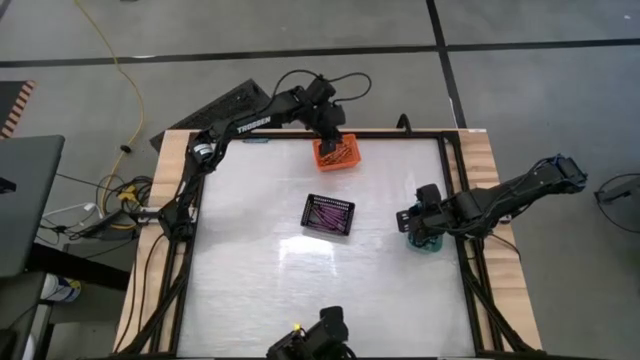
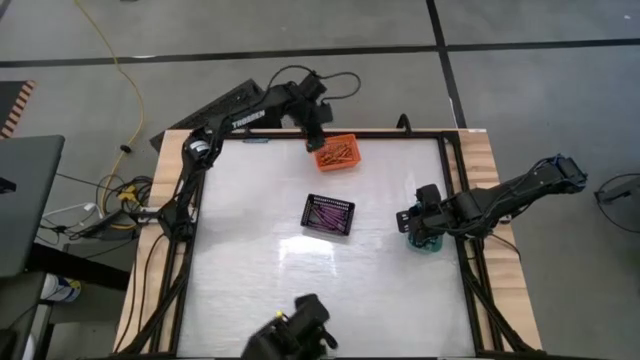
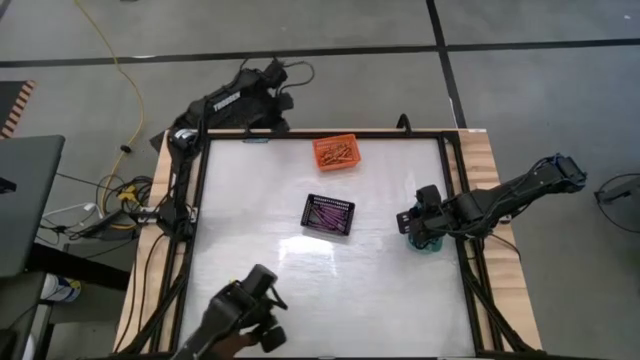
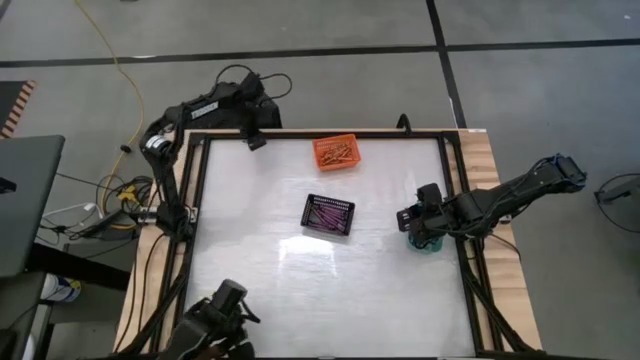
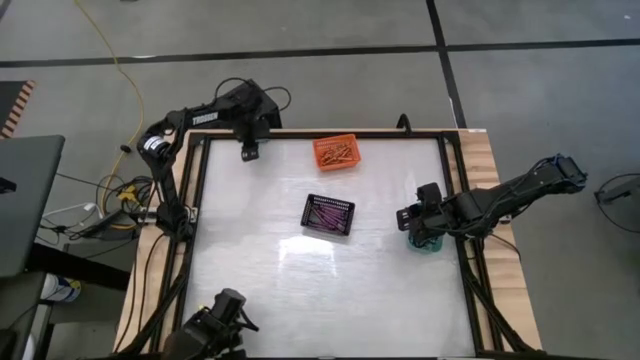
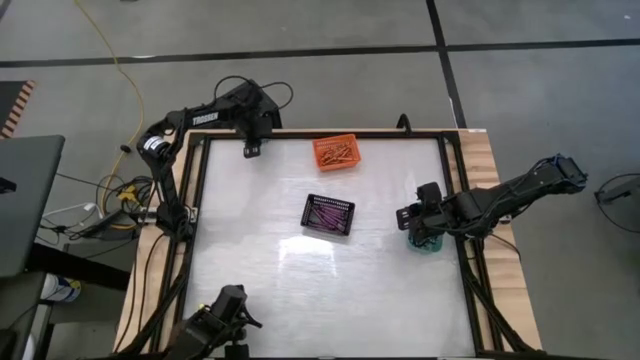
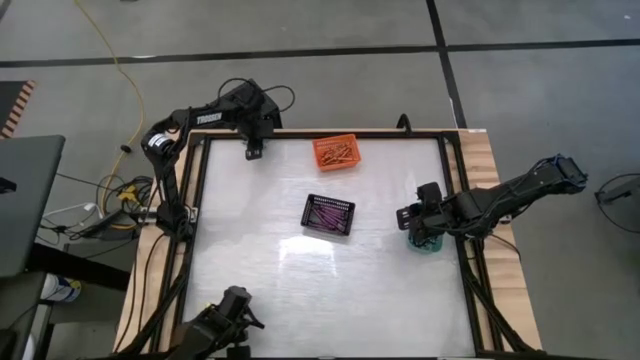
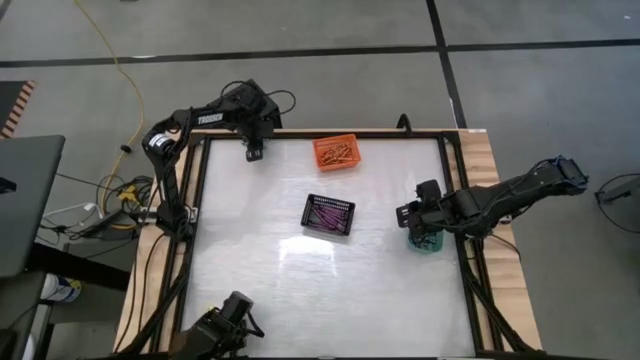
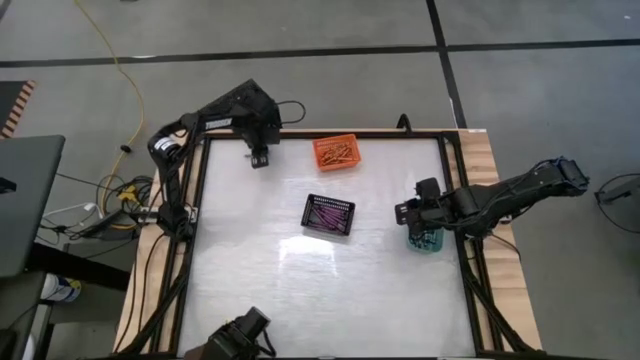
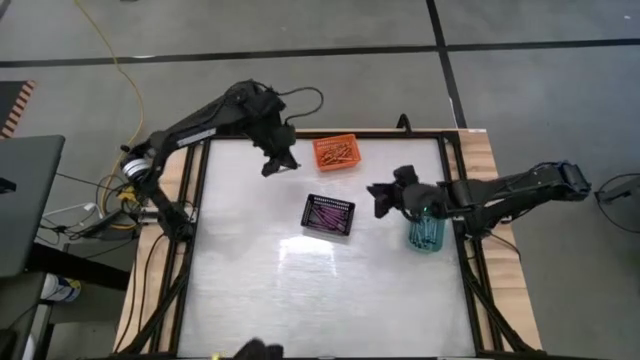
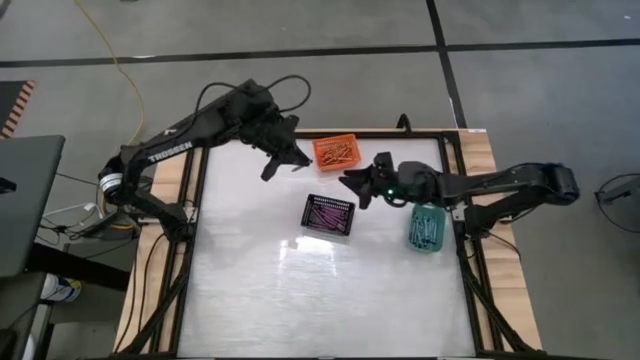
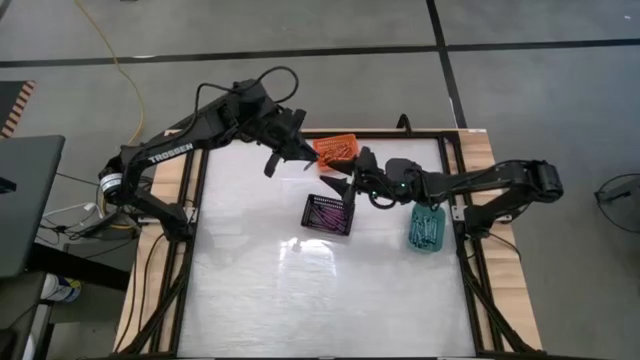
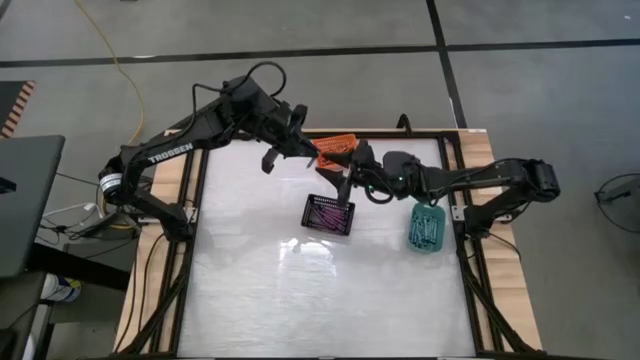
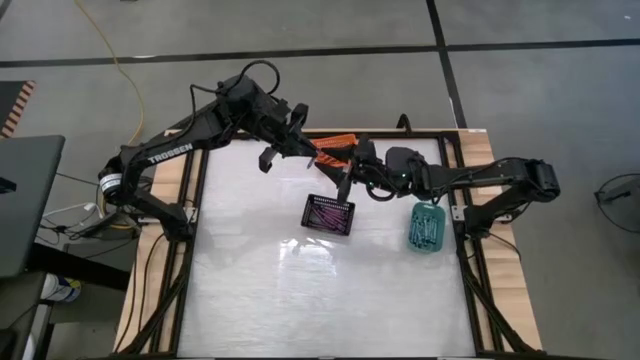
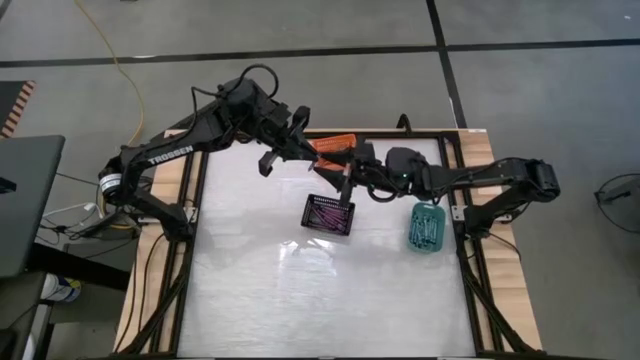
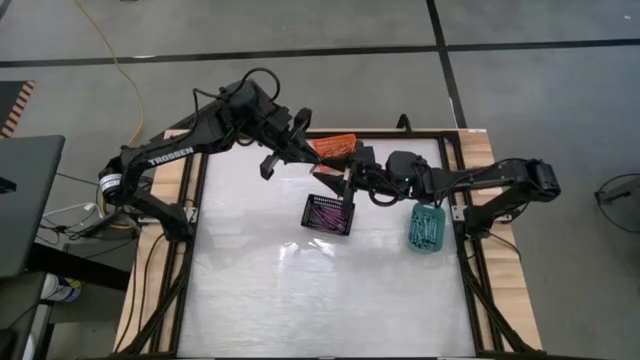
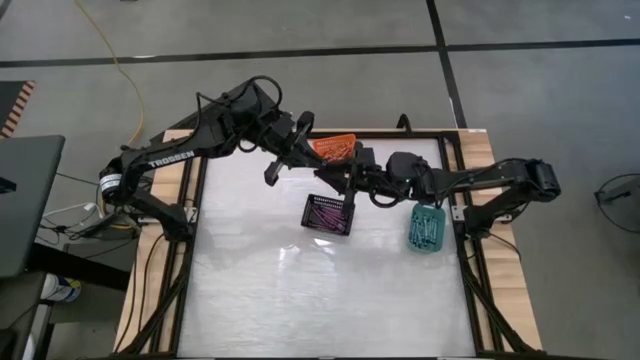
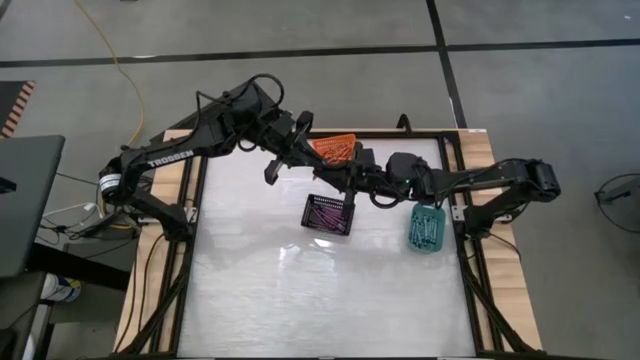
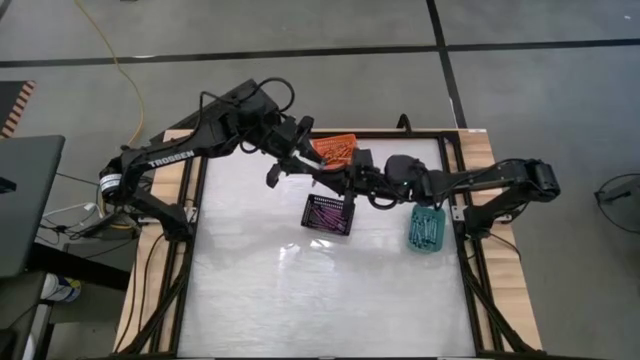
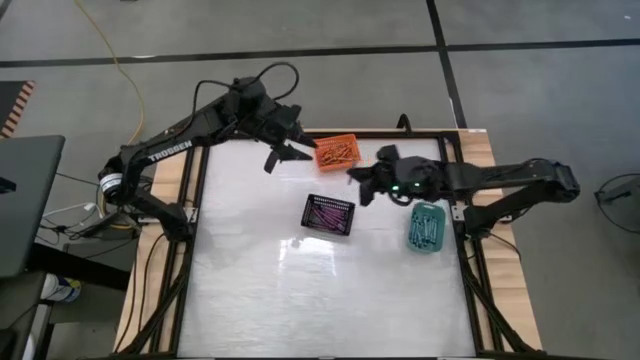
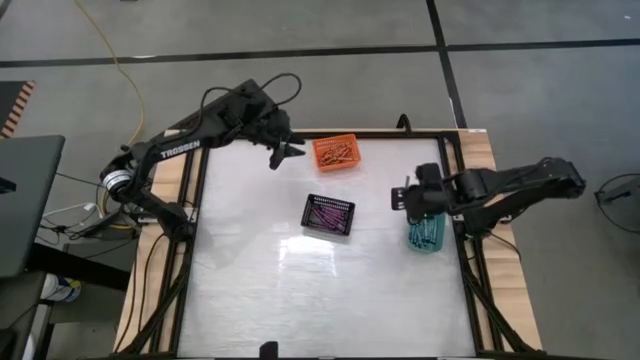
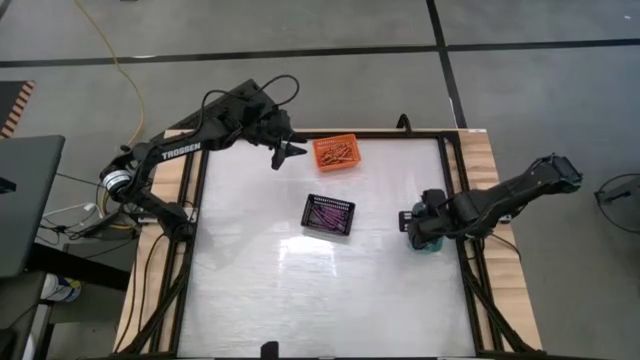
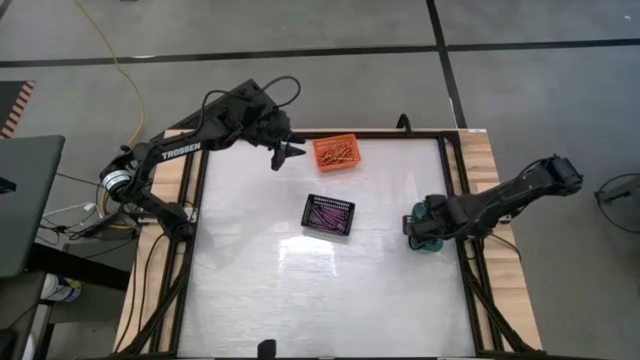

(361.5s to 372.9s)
Task: Sort crayons
Put the blue green crayon into the green bin

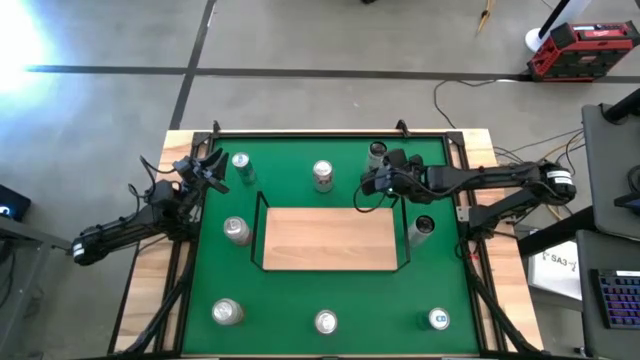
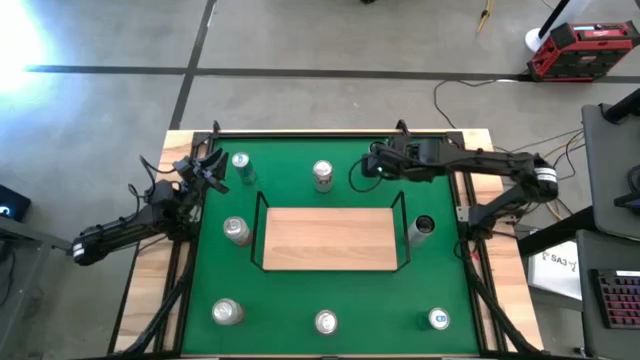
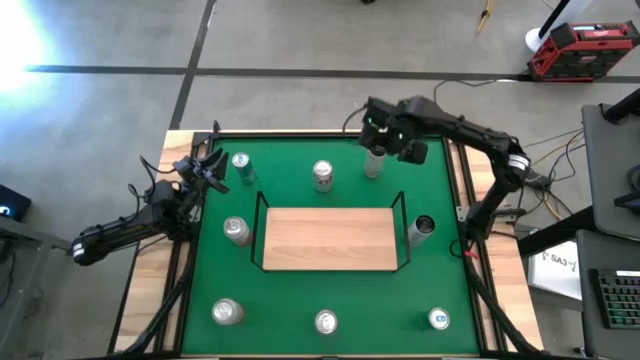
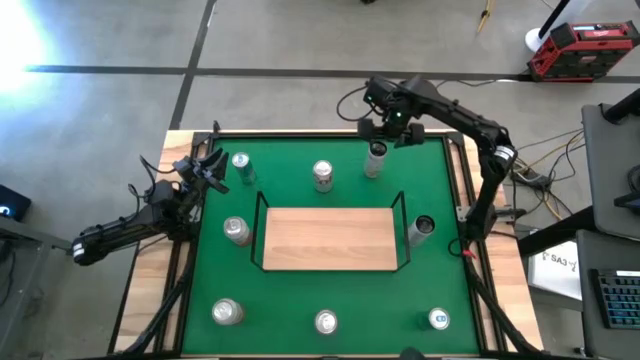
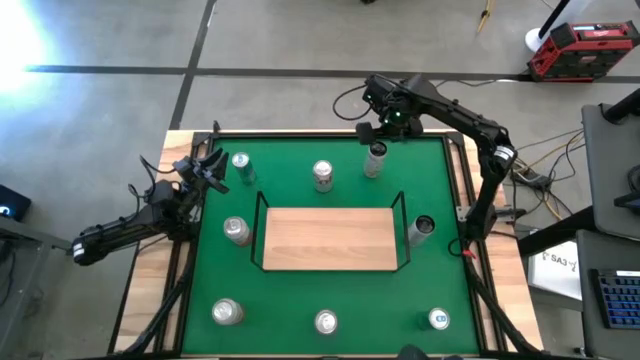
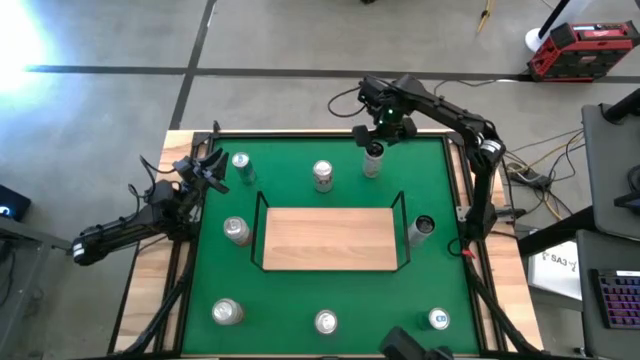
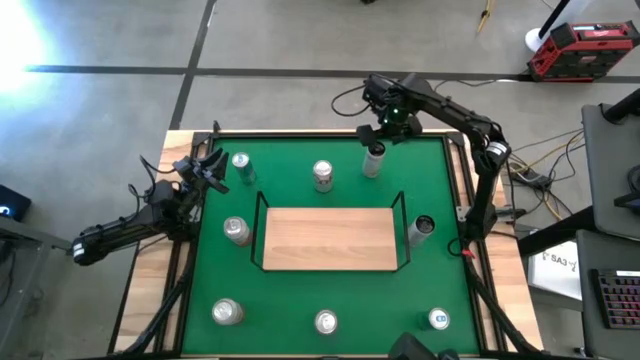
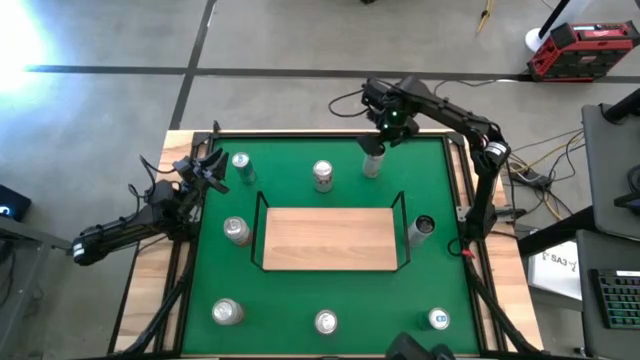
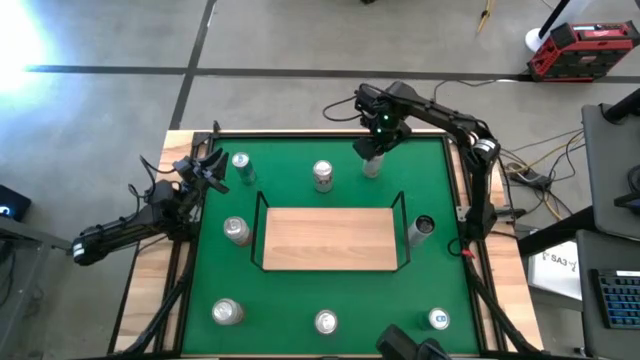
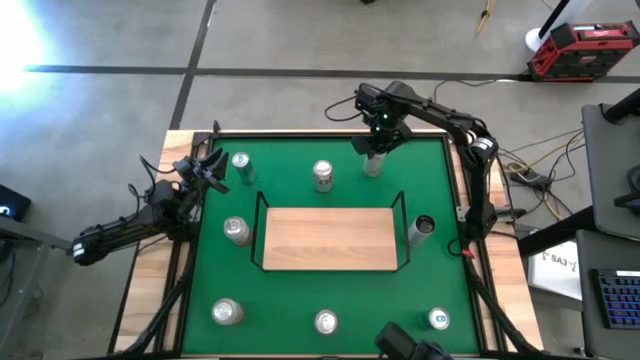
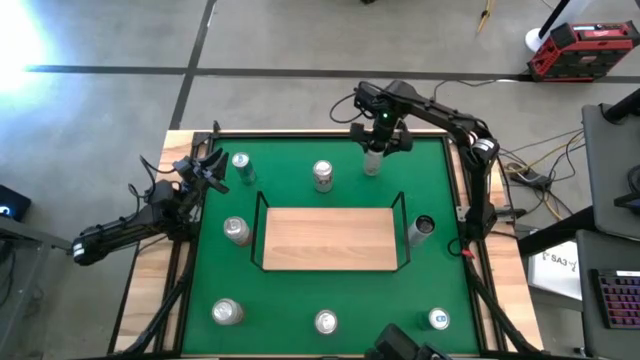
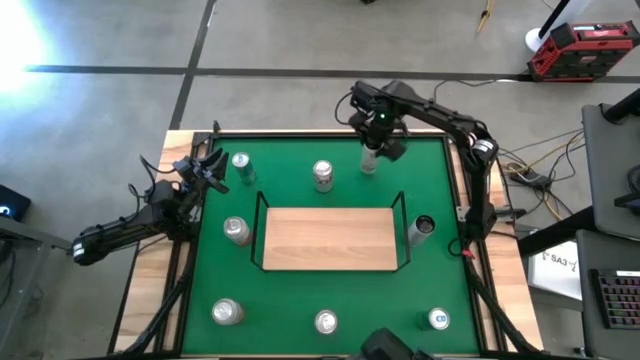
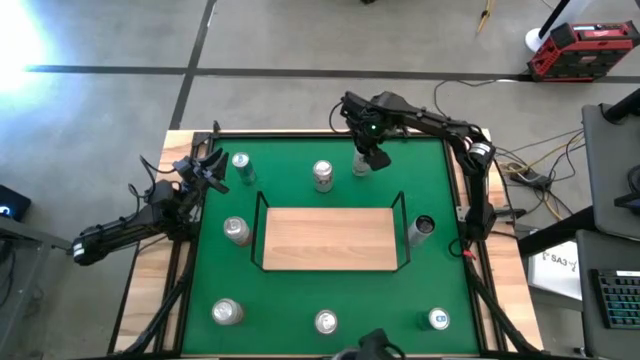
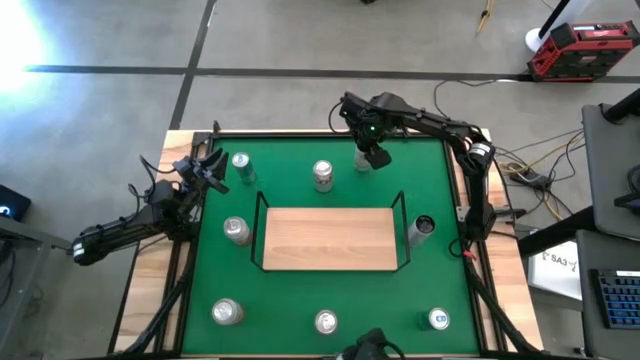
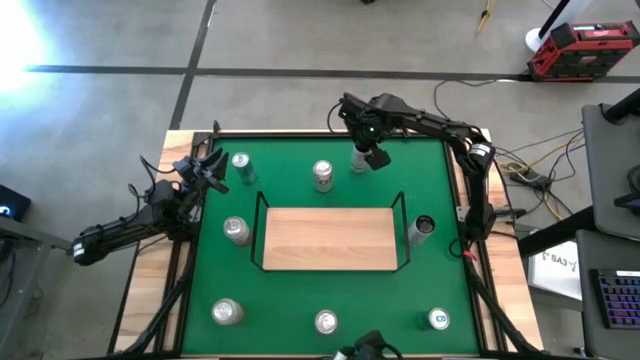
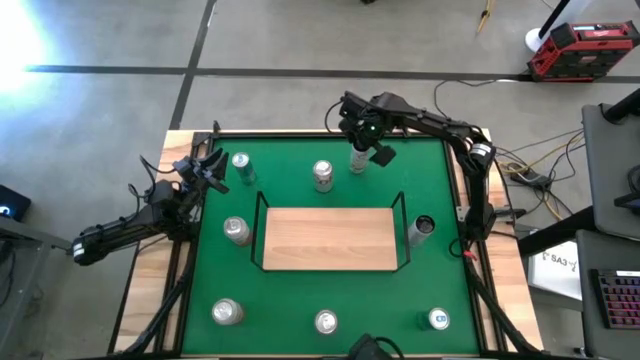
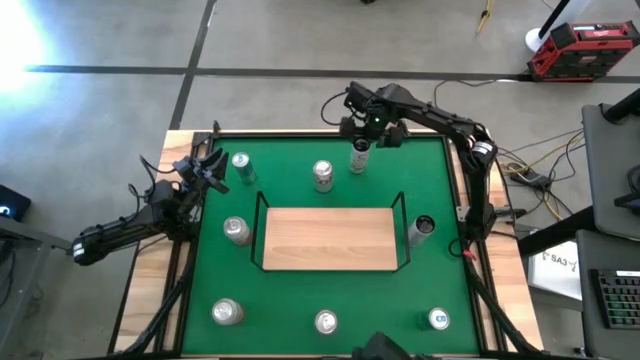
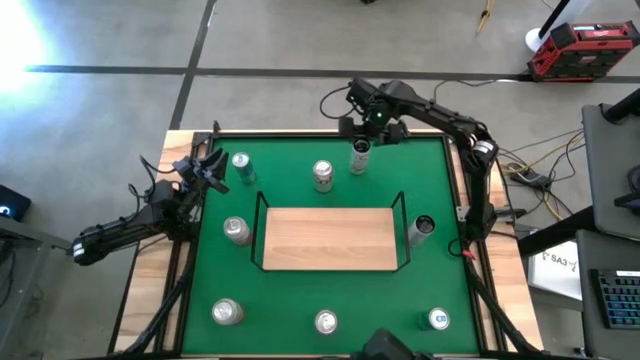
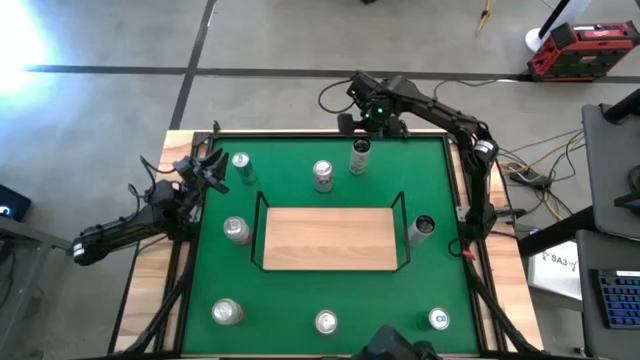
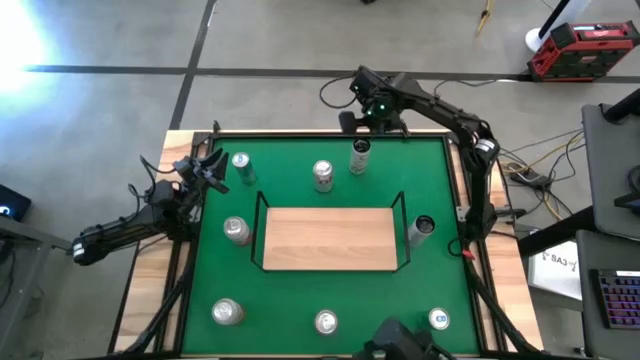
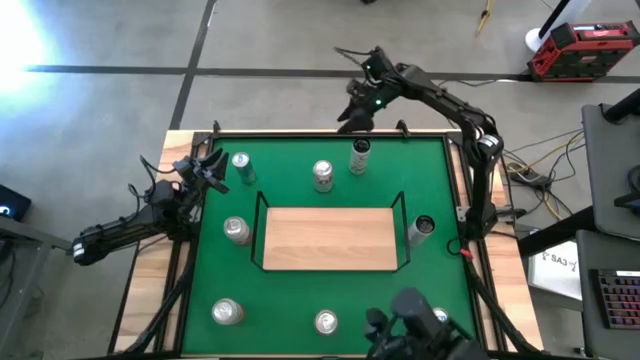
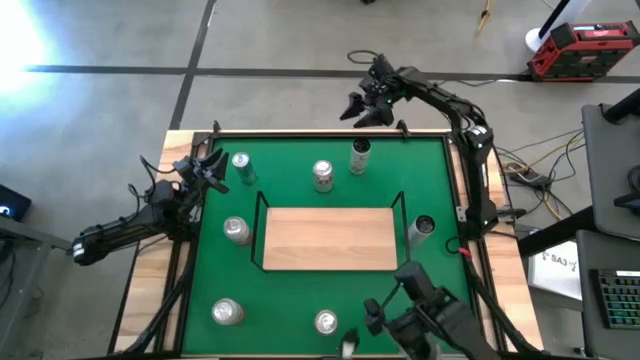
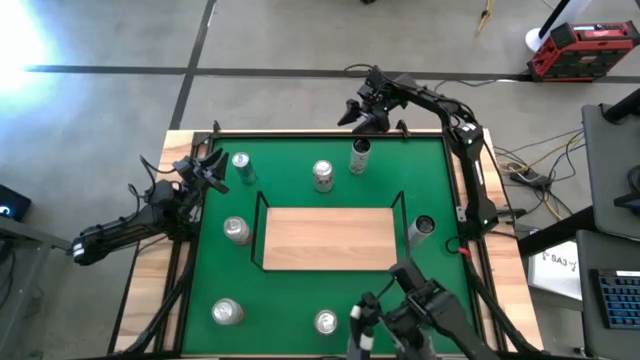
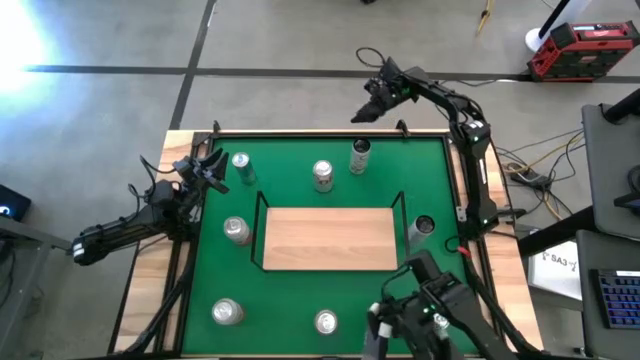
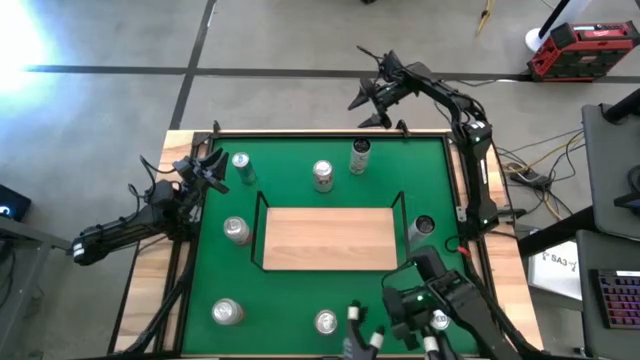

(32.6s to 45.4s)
Task: Place canned beverage on shelf
Put the top white-yellow soda can on the shelf
